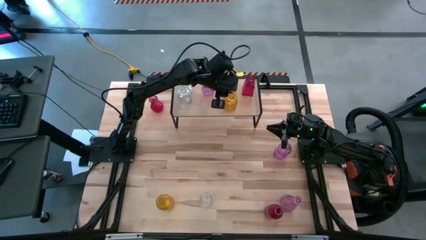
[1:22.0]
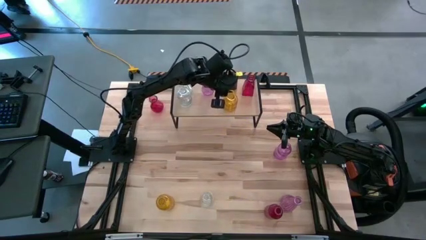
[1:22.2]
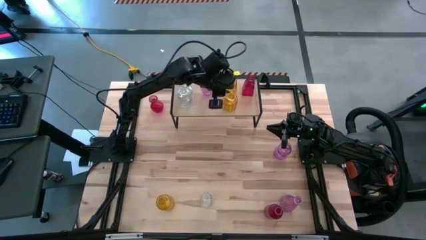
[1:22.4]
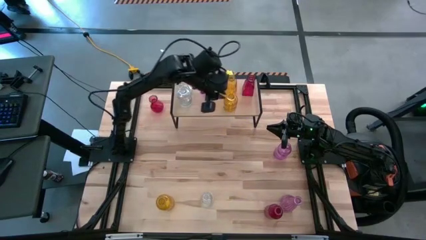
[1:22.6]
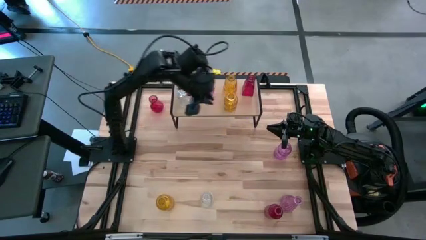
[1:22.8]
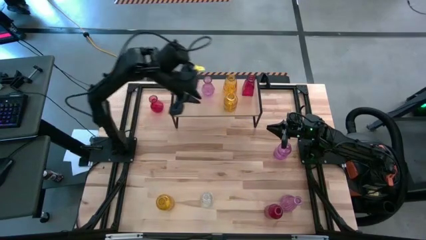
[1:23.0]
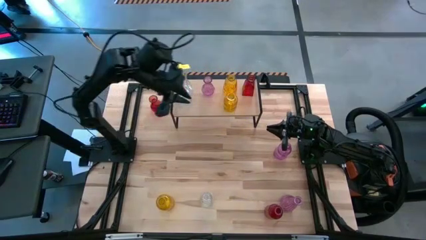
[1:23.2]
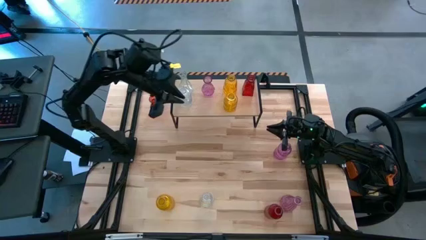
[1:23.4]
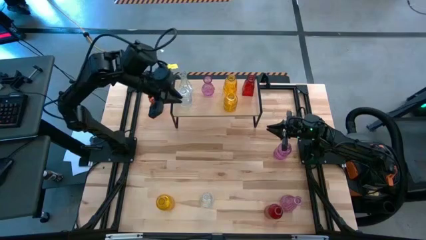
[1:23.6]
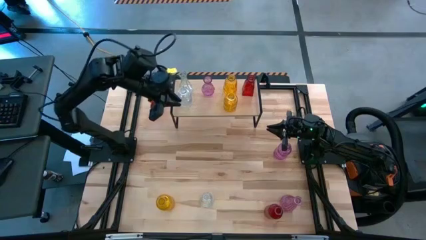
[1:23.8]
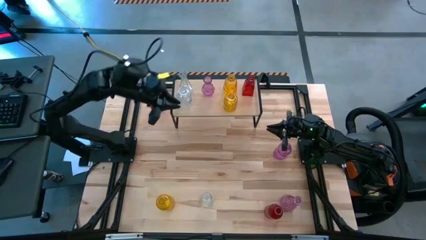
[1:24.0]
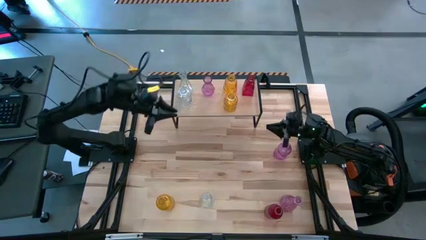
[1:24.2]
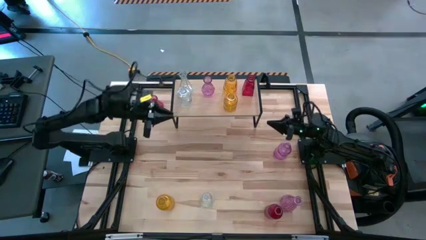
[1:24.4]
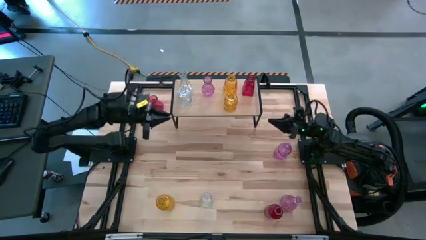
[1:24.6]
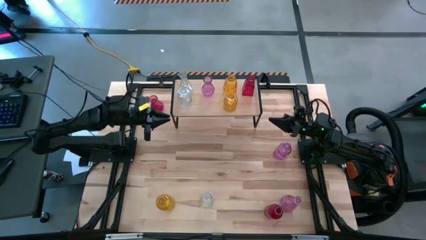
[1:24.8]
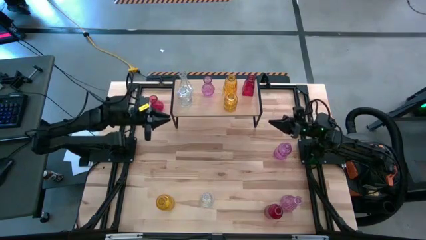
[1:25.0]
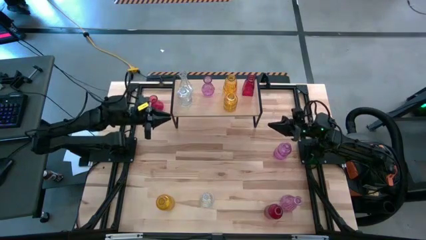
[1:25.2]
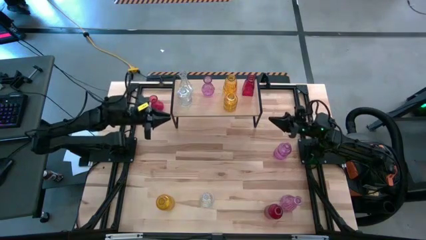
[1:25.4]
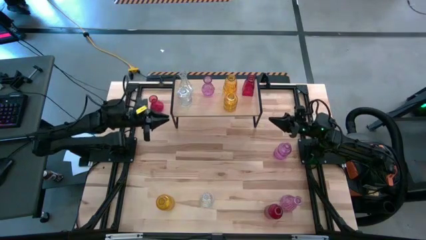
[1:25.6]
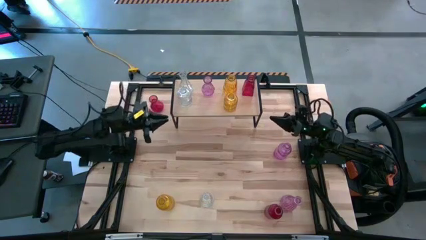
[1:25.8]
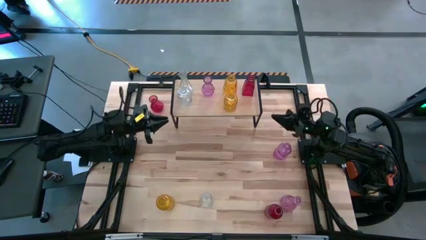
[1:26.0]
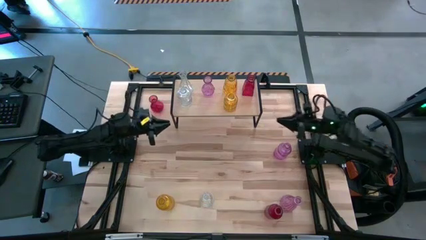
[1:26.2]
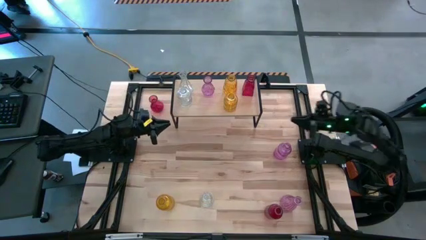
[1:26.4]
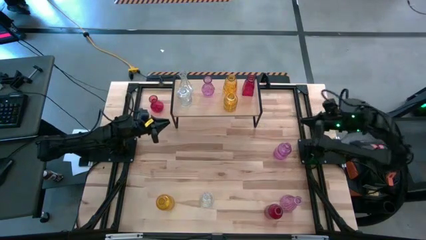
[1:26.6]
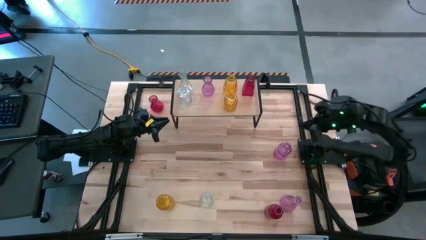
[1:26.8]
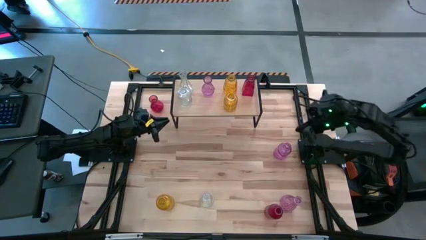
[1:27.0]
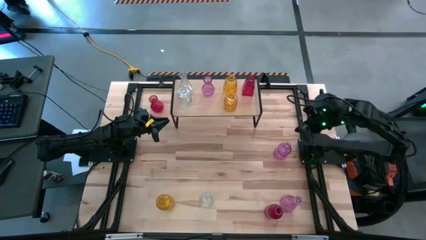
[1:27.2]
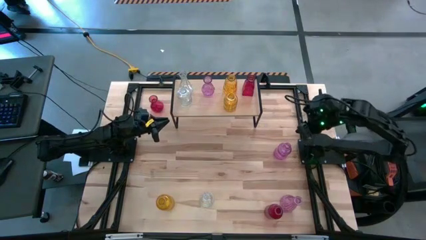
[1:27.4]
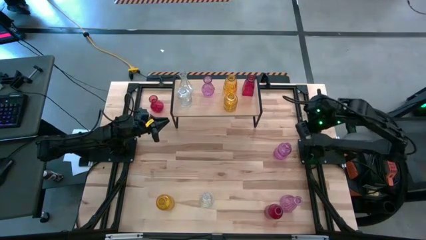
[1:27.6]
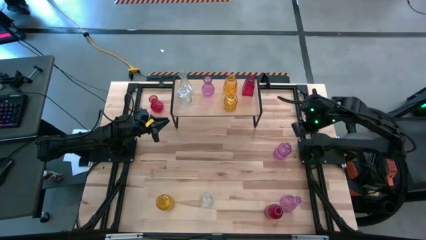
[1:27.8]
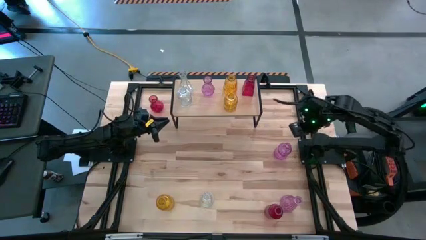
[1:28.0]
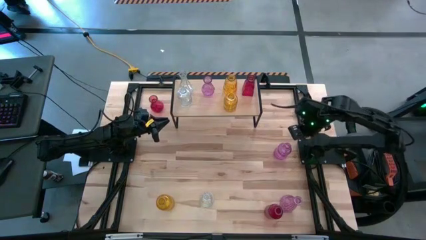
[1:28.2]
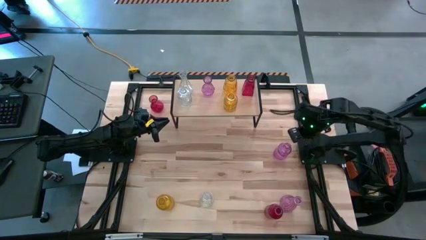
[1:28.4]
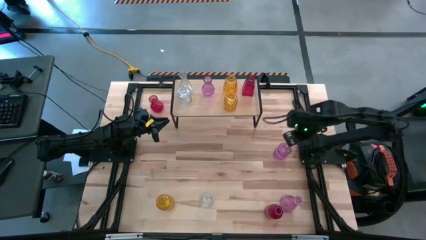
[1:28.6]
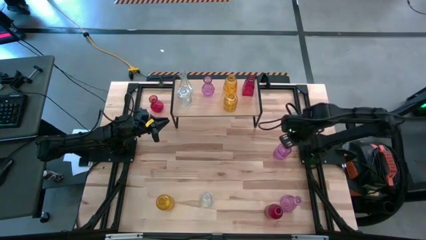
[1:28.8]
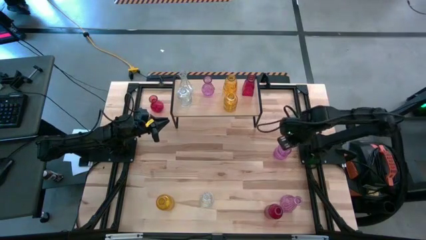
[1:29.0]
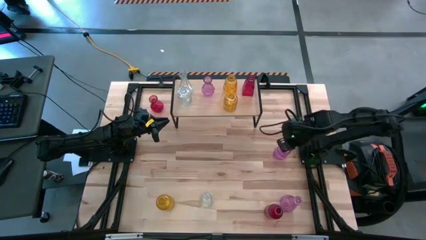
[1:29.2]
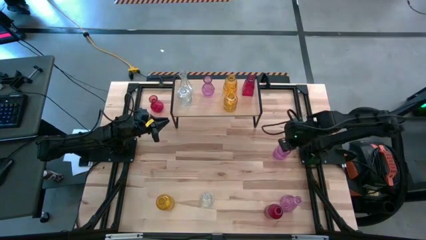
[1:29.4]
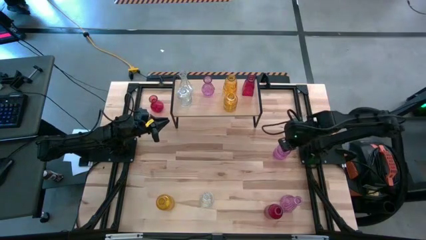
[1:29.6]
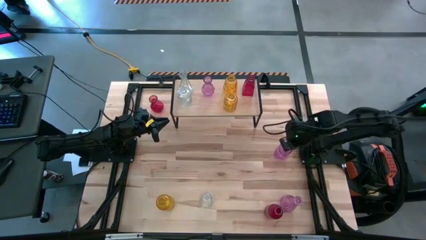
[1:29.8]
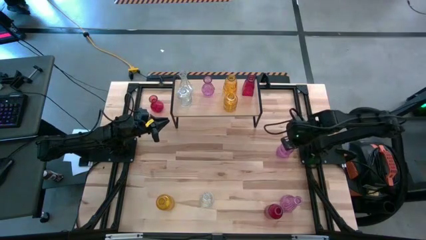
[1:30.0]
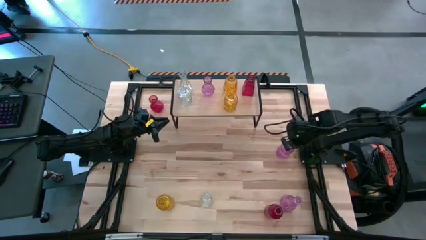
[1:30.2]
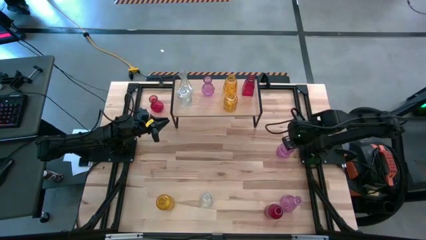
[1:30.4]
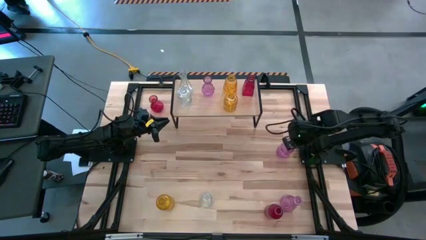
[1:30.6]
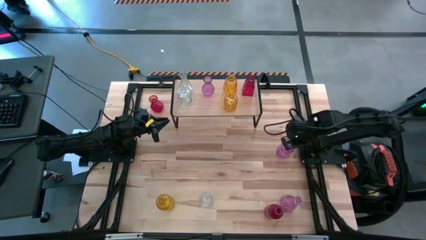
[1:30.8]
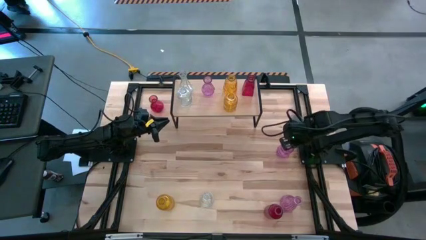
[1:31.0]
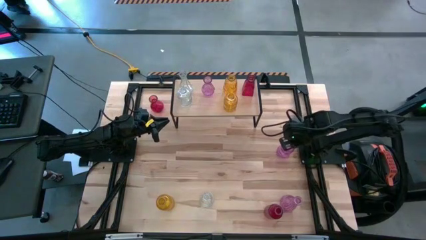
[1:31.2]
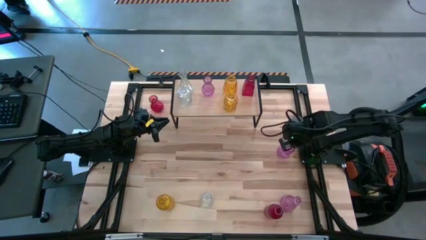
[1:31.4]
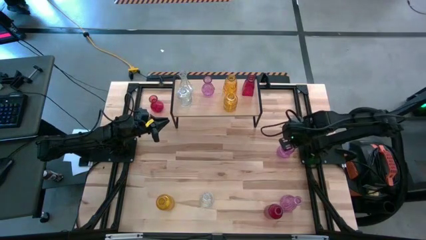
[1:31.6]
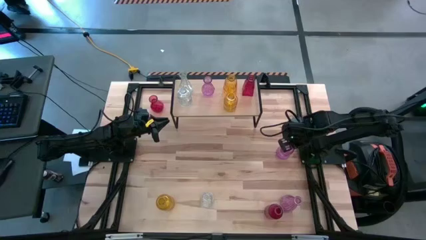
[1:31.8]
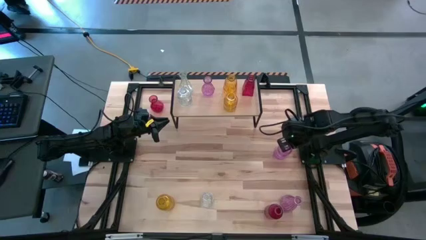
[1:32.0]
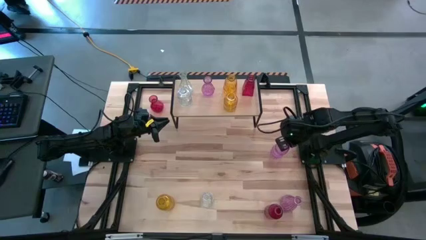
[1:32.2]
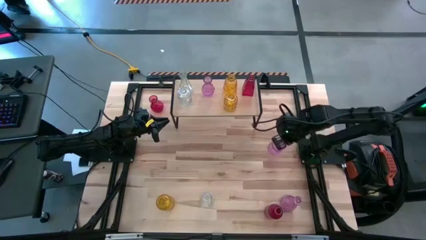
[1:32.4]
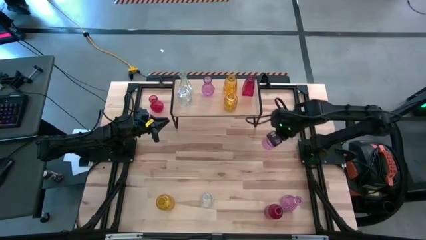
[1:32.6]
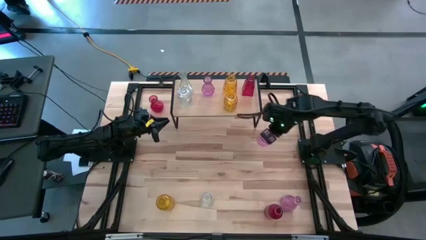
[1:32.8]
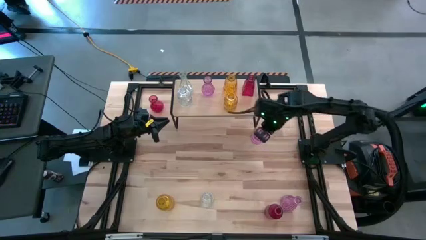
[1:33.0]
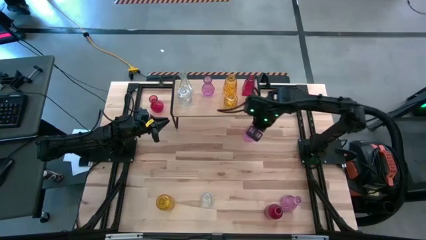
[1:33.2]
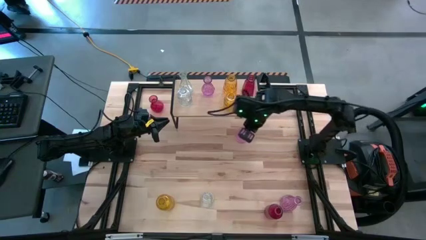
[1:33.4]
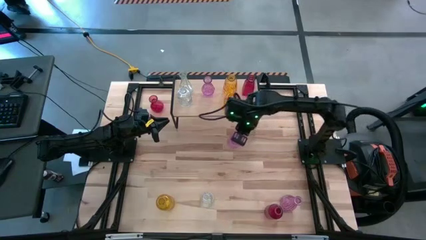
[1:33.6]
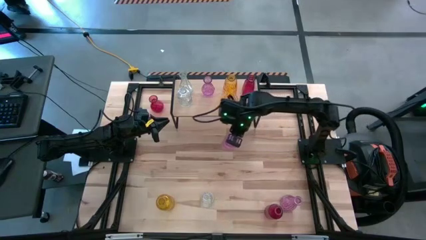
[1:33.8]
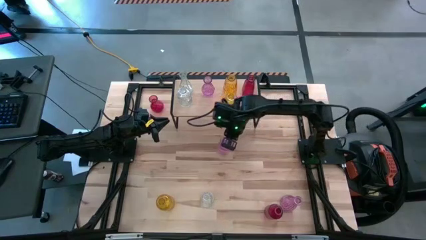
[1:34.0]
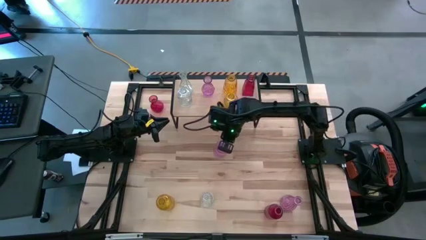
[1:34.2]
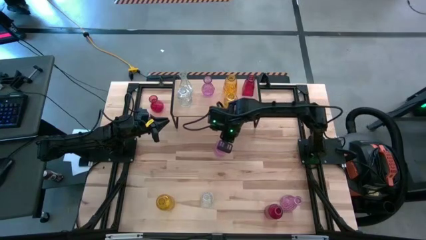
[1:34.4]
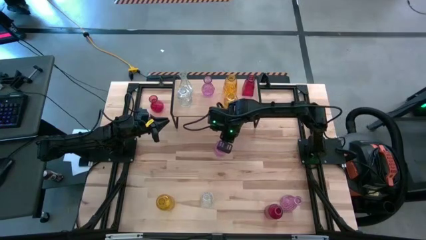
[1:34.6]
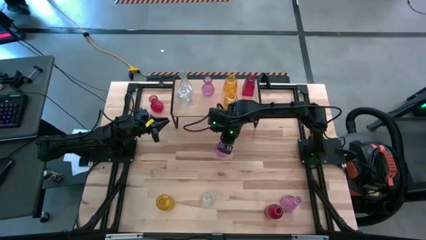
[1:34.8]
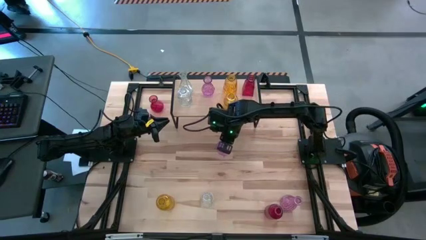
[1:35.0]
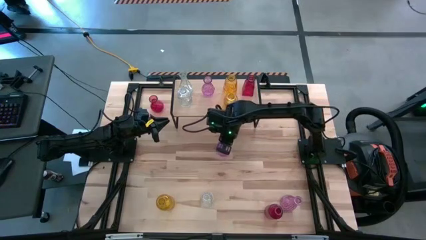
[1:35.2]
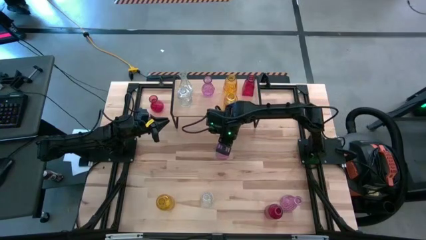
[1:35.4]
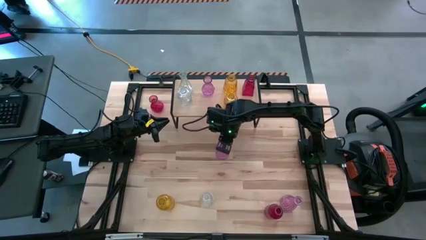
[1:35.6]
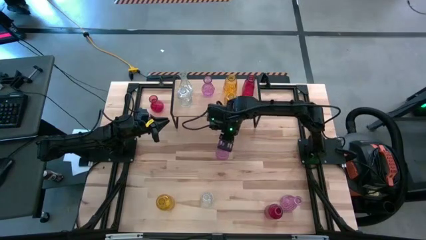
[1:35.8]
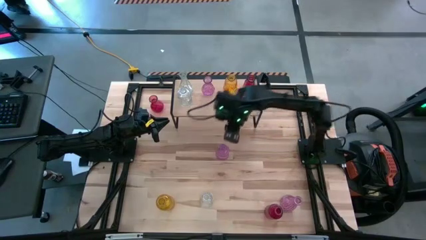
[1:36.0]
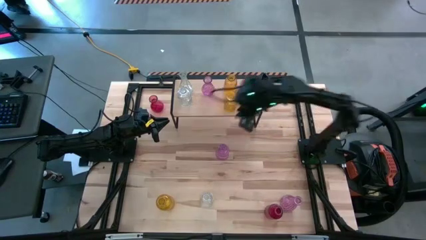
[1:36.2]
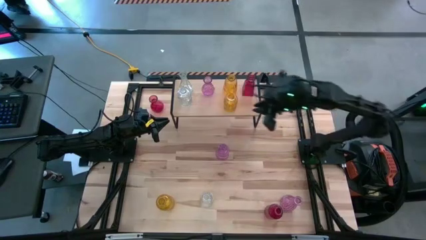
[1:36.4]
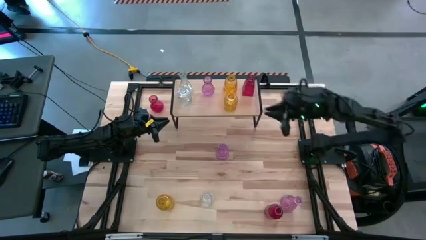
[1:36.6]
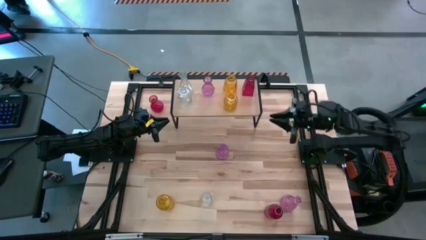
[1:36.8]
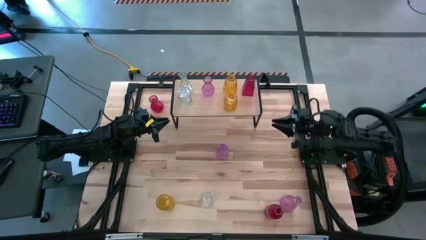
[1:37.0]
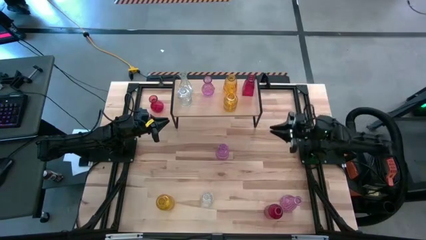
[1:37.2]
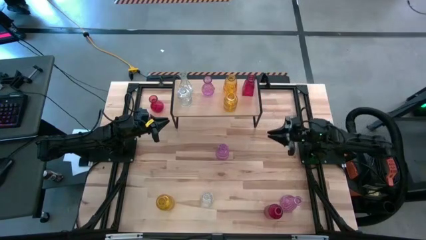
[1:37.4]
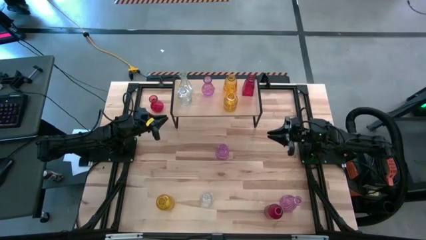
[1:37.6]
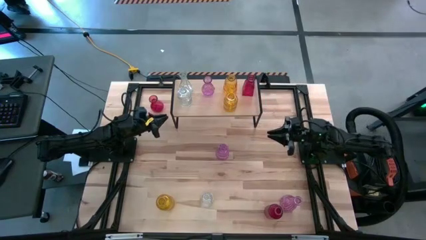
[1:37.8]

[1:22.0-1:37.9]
Task: sort vases onto shelf
Put the top purple vase on the shelf aligned with the other purple vase

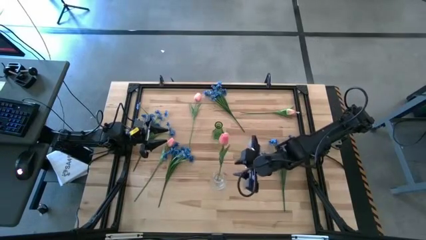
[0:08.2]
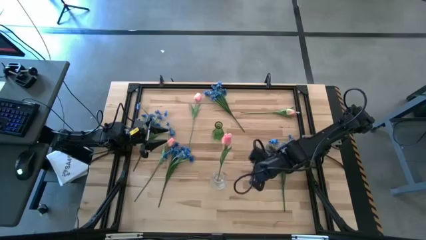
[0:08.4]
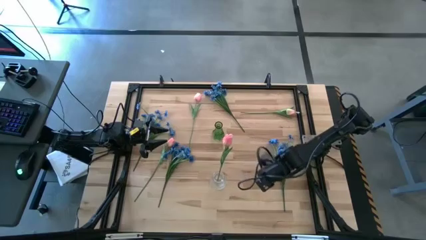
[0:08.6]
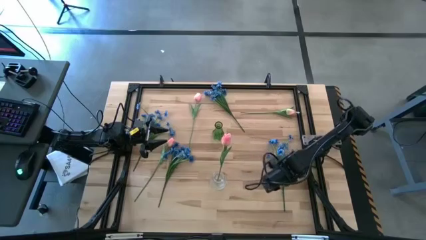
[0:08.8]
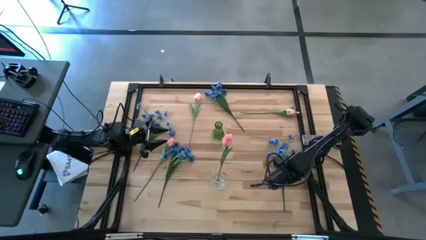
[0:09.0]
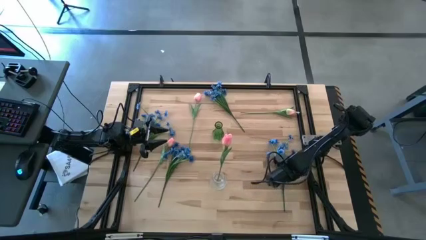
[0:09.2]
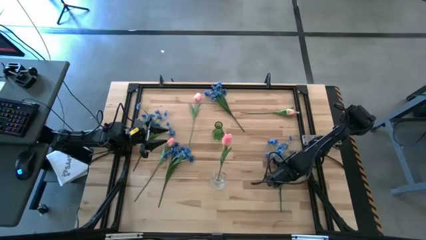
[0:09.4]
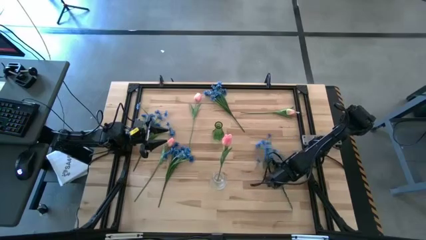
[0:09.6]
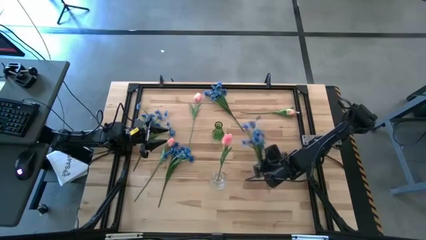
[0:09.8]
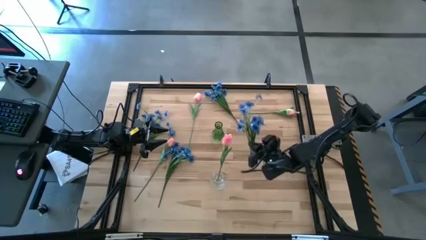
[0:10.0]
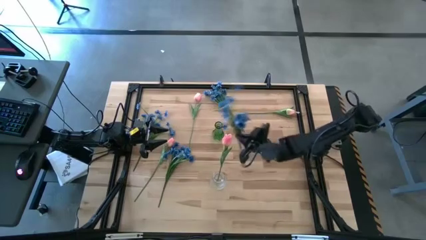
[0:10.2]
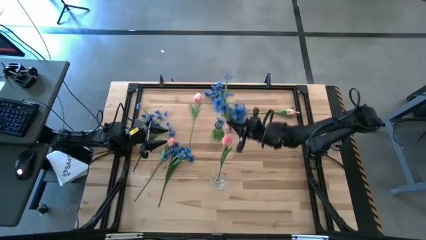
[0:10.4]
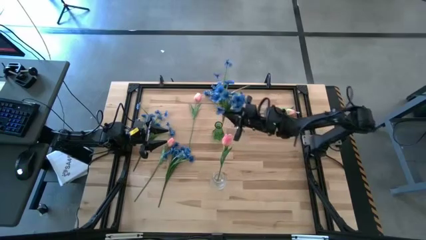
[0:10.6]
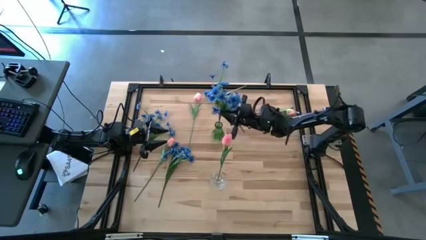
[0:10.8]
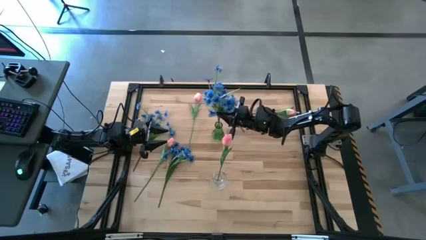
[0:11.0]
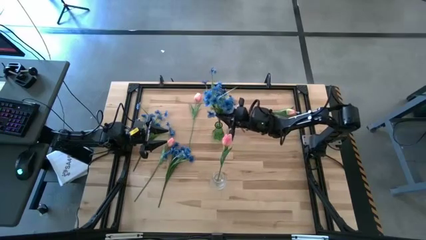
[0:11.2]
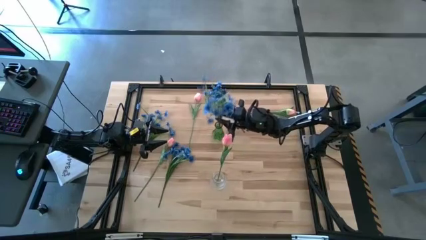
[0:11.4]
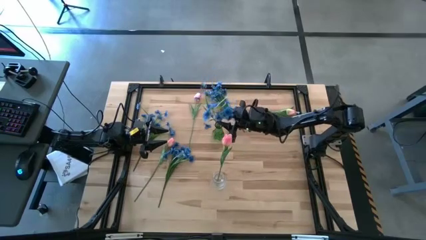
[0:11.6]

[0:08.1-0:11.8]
Task: Sort flowers into vase by color
Put the bottom right blue flowers into the green vase
